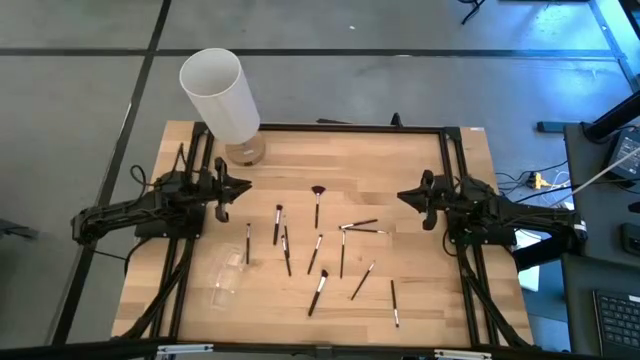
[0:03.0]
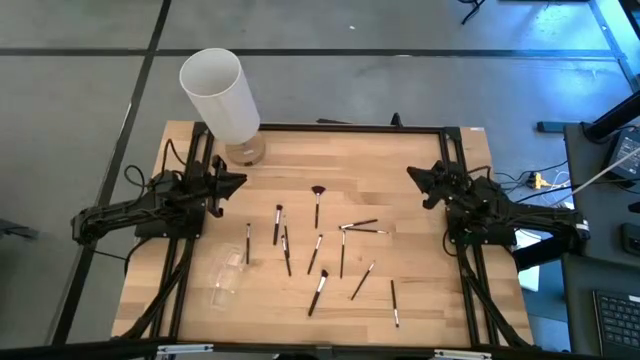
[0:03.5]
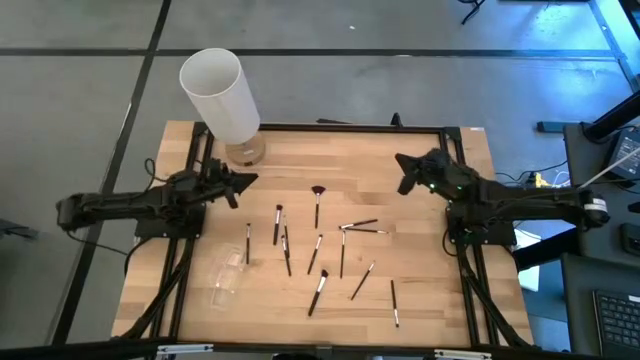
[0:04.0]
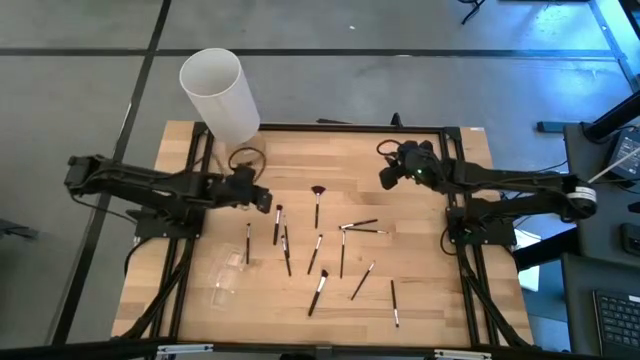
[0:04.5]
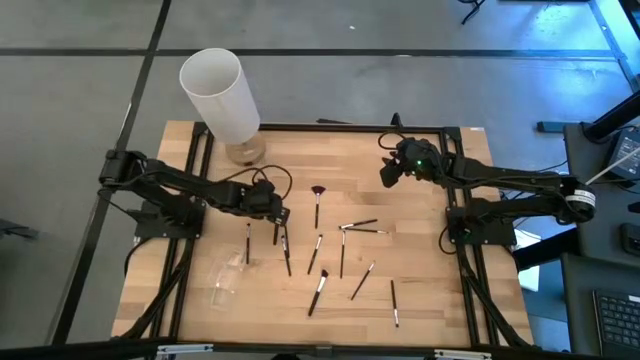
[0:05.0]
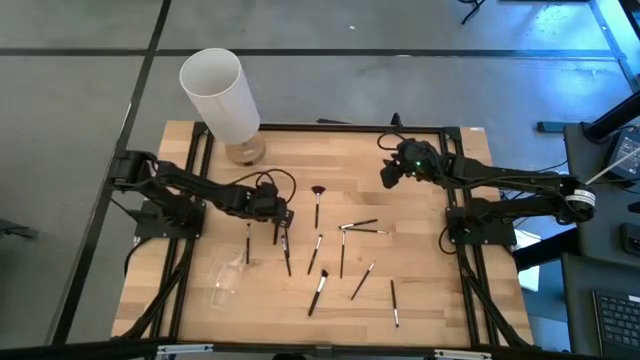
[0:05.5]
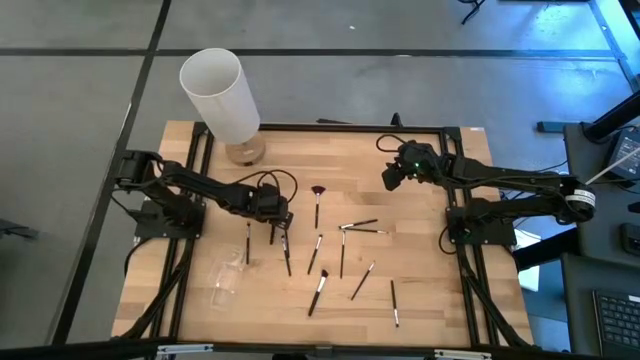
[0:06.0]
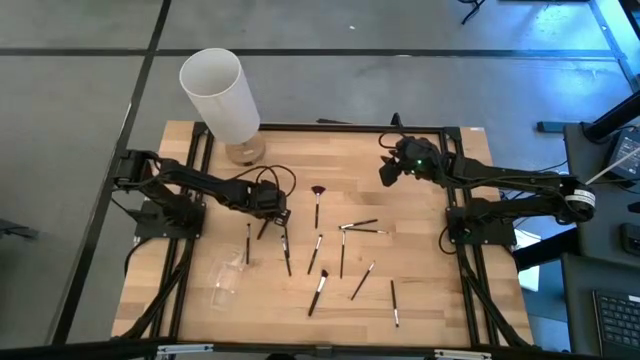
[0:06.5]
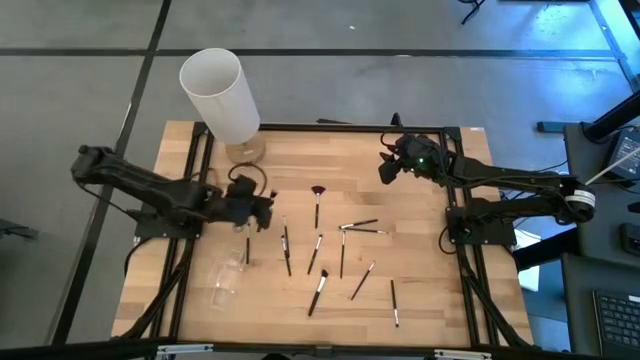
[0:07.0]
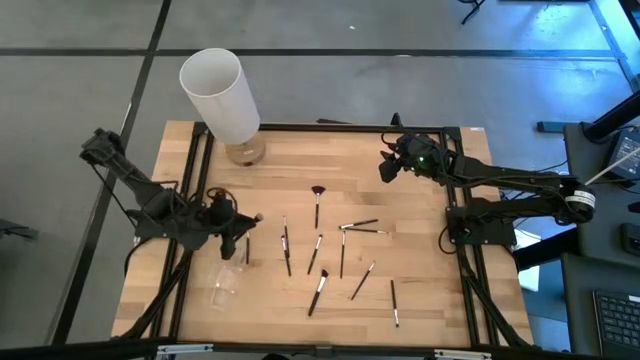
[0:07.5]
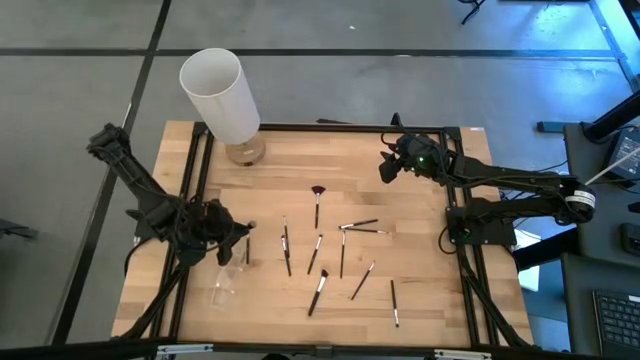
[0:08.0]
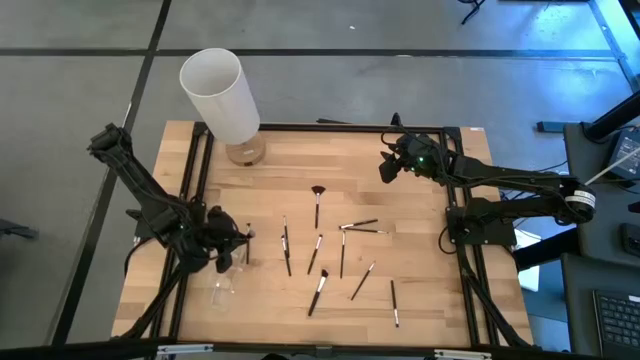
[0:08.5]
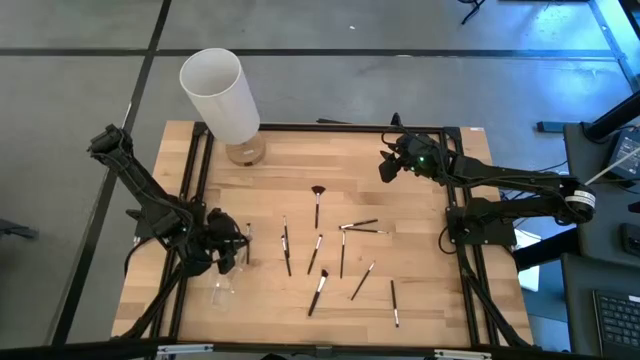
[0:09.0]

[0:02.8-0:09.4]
Task: Put items in baskets/containers
Put the black blush brush into the transparent organizer

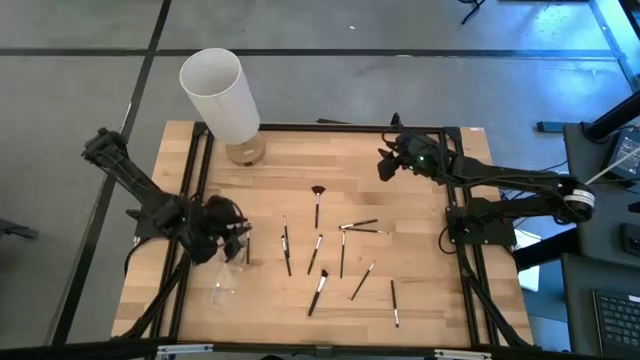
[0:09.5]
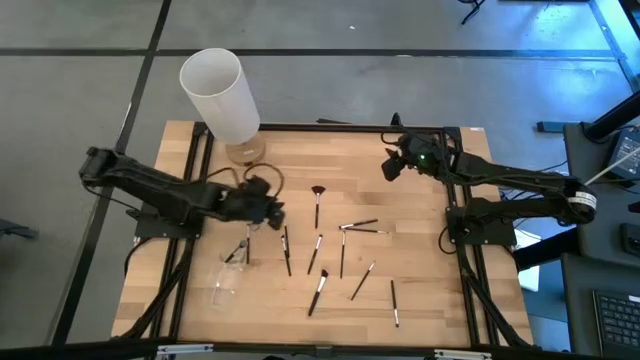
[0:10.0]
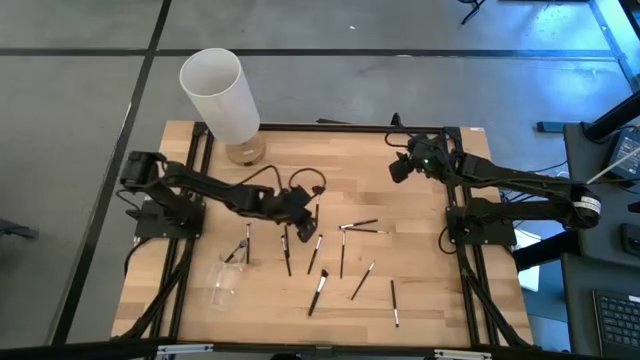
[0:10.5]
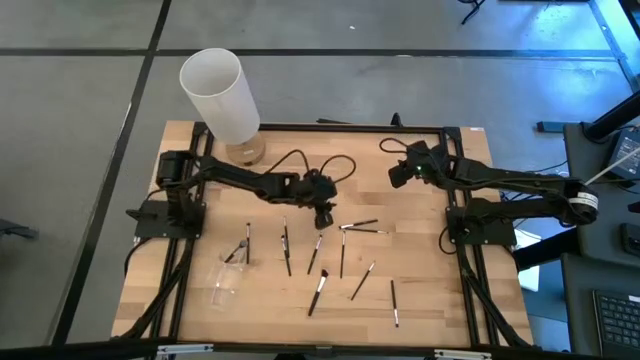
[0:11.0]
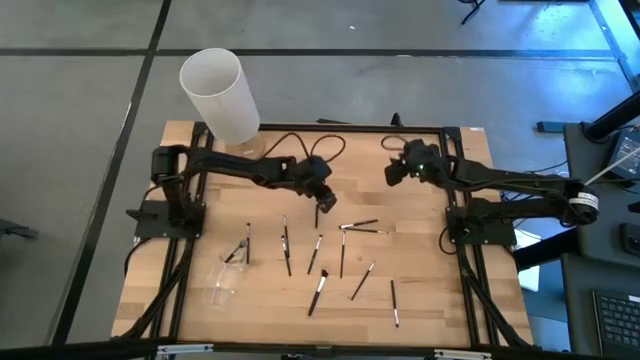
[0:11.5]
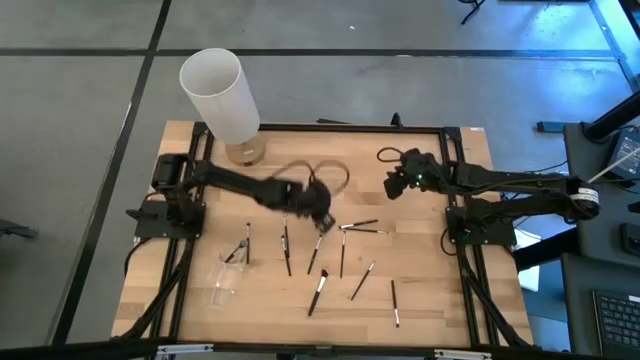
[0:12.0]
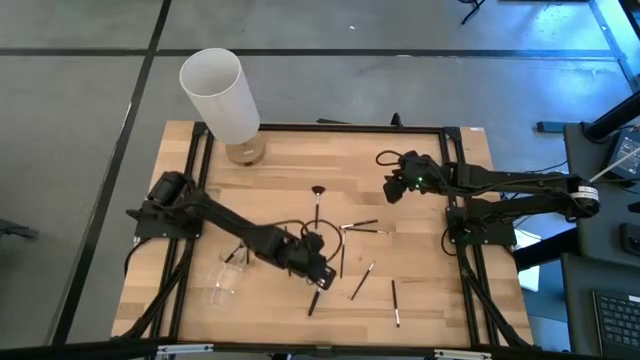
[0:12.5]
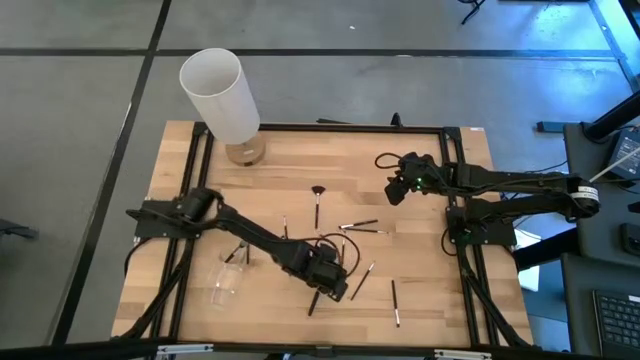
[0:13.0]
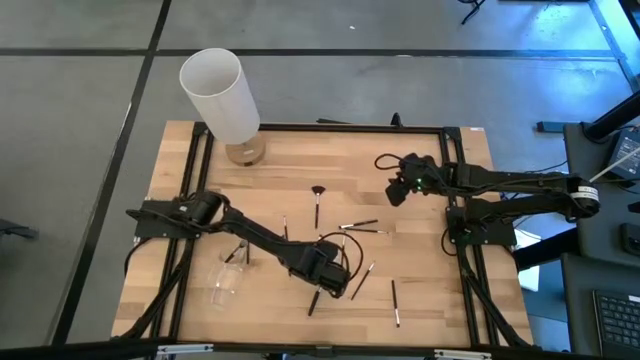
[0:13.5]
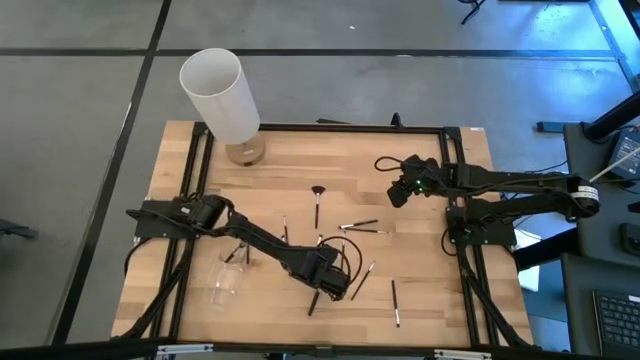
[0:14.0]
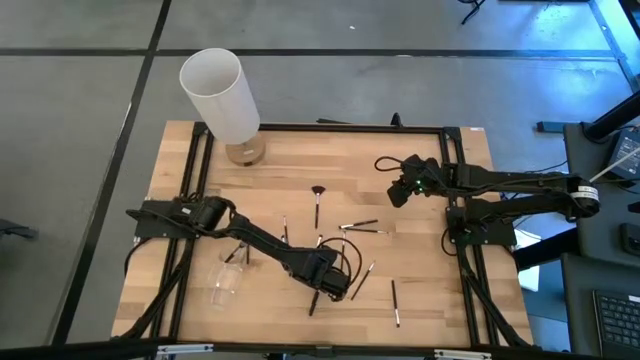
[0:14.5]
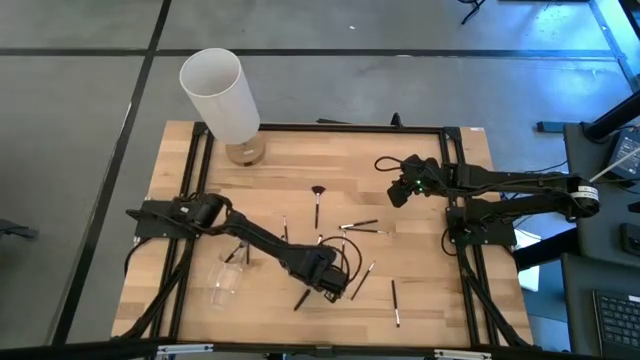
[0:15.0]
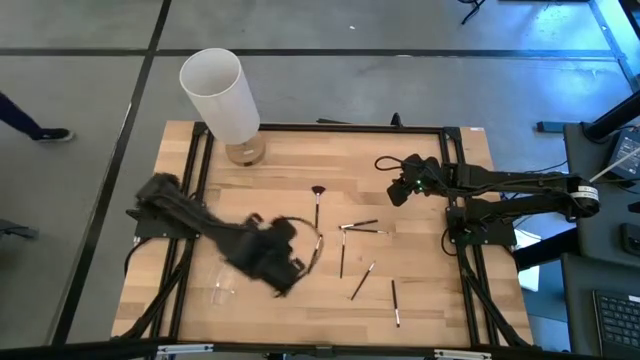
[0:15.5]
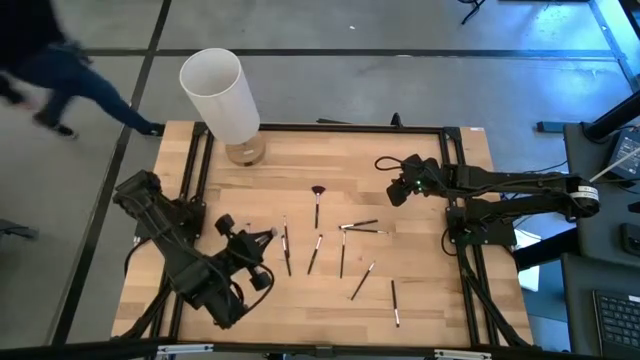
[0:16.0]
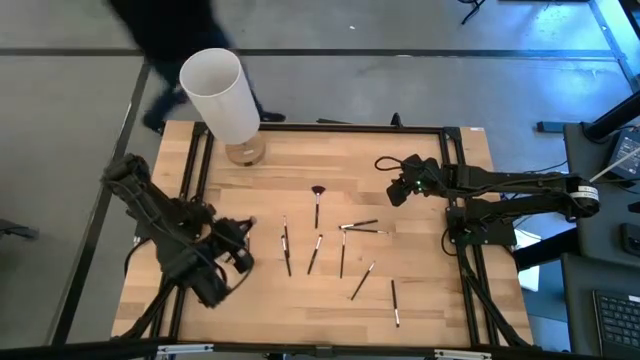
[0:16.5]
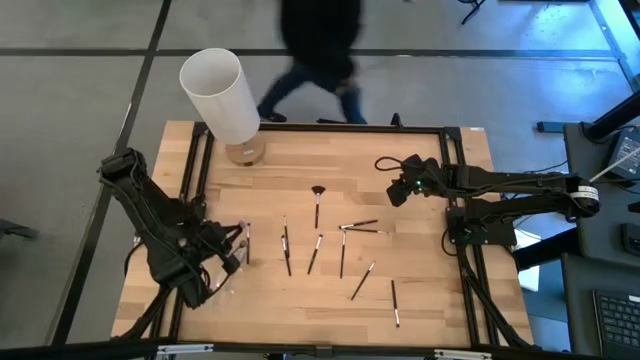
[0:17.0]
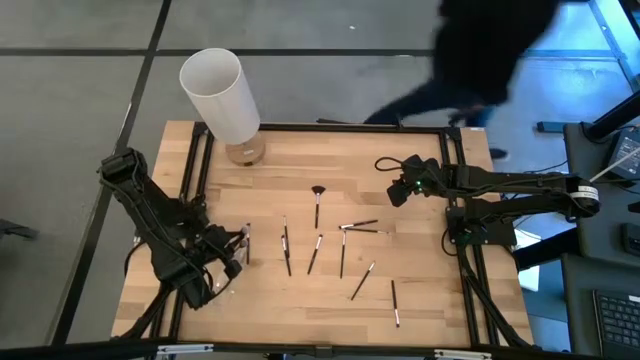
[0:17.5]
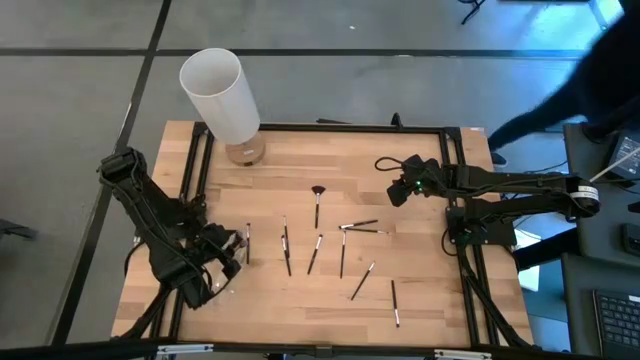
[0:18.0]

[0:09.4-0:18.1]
Put the black powder brush into the transparent organizer

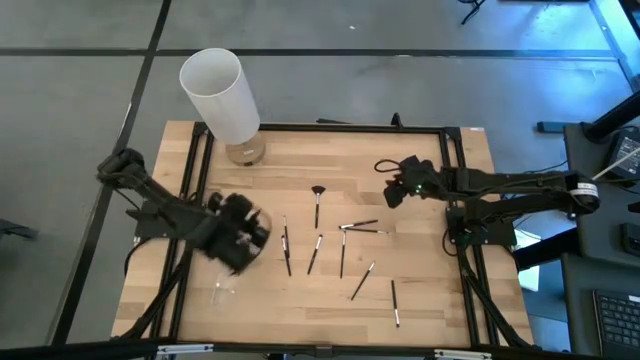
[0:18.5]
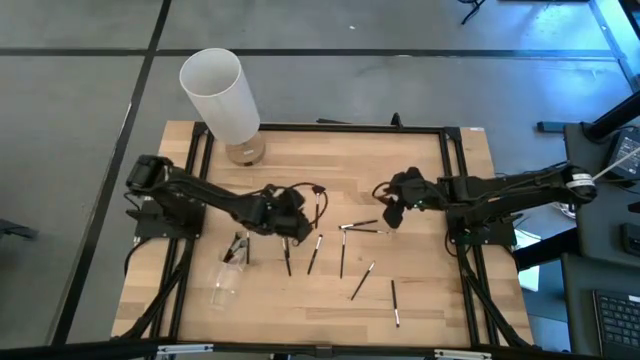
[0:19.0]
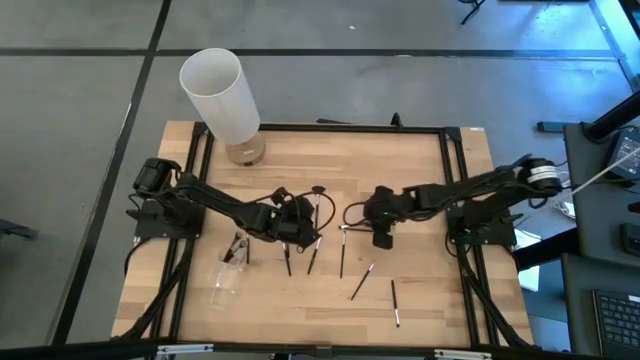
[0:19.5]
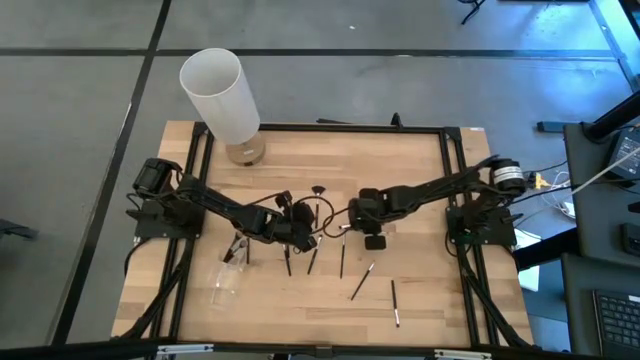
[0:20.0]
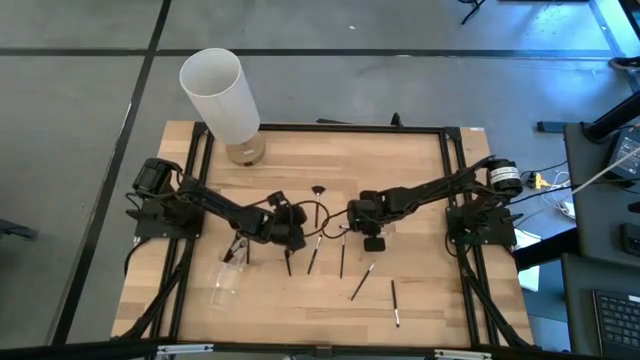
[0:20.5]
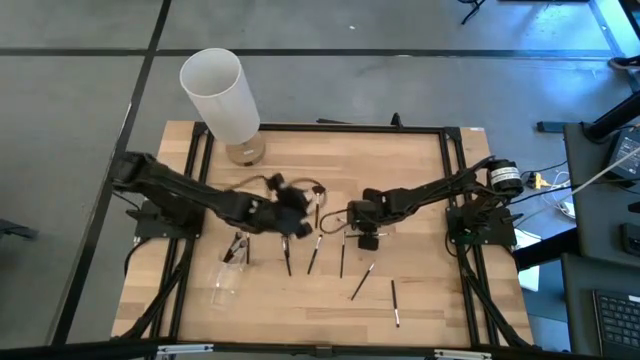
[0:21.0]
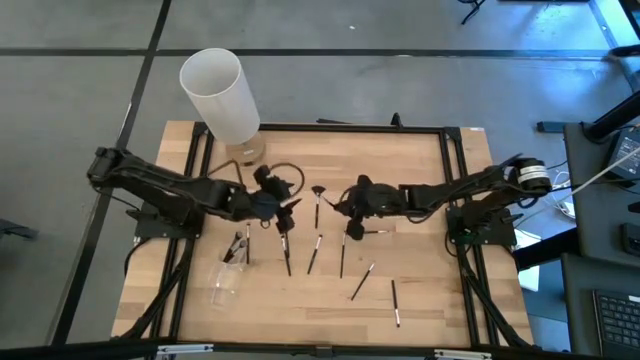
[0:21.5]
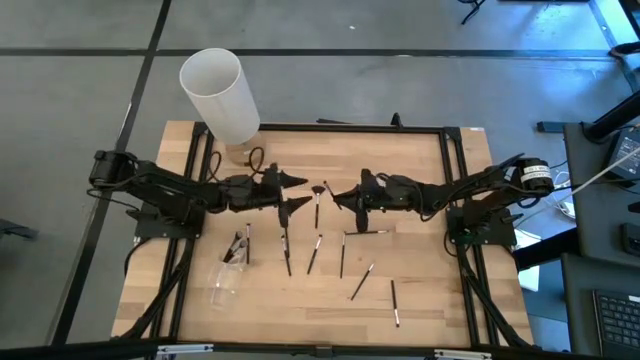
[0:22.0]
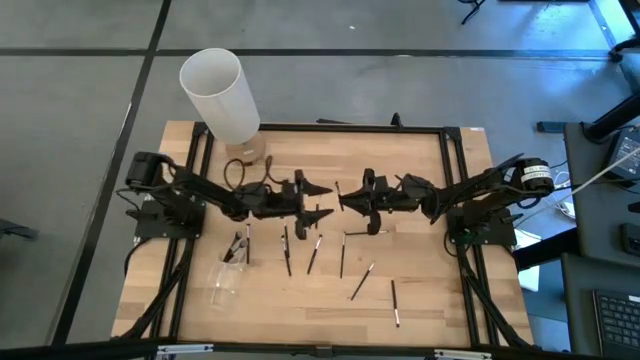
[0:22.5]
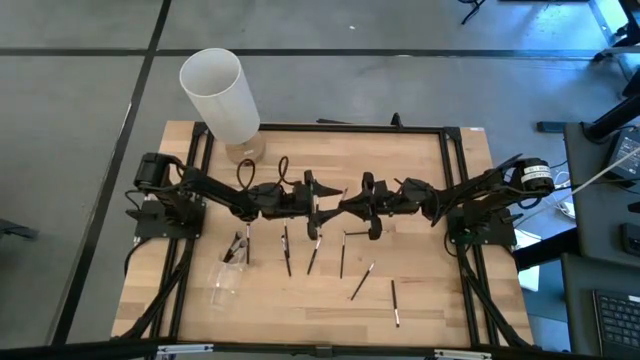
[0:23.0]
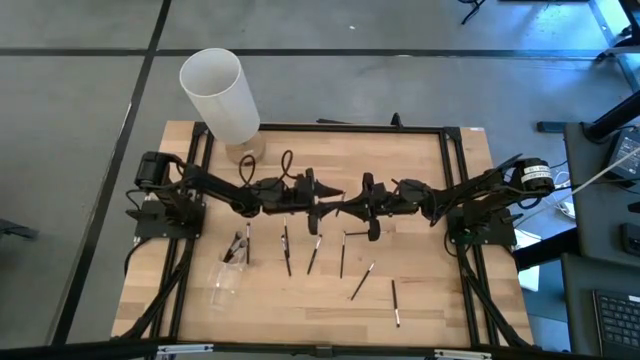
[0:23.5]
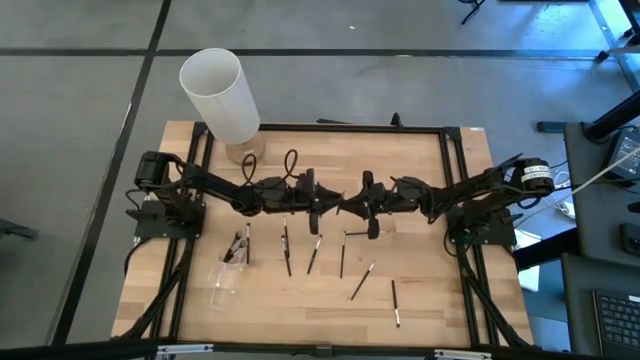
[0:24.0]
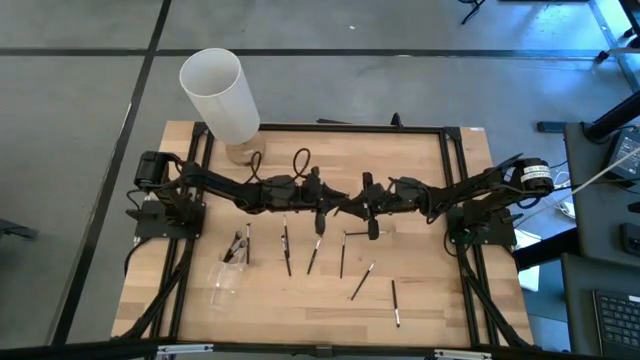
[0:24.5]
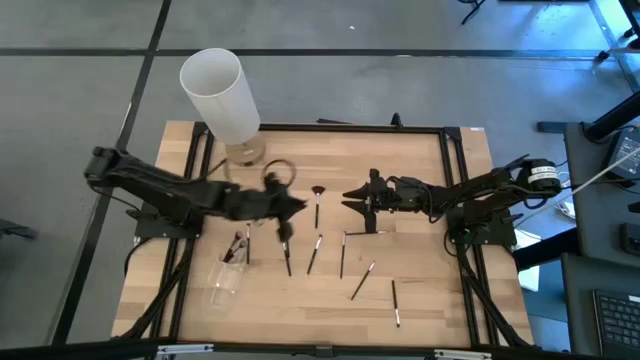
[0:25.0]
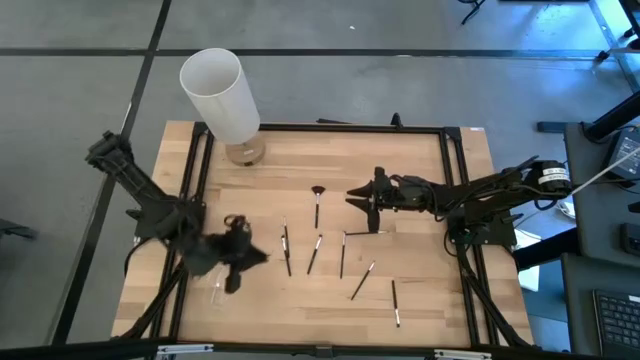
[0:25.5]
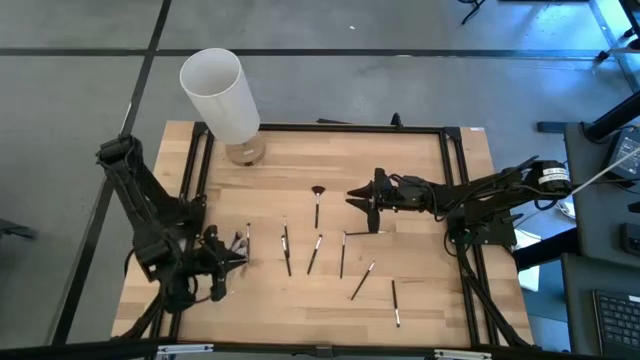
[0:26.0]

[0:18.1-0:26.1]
Put the black eyeshadow brush into the transparent organizer
